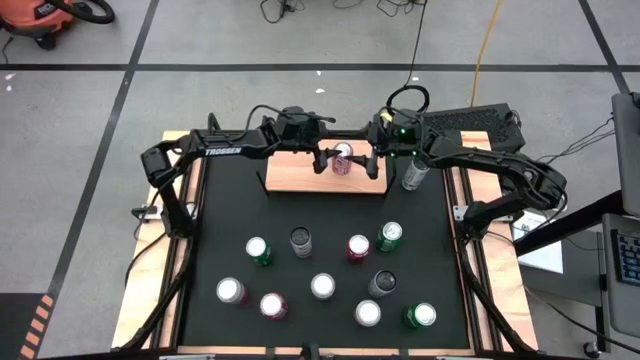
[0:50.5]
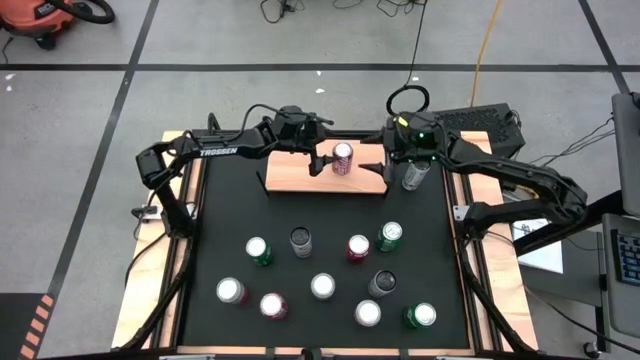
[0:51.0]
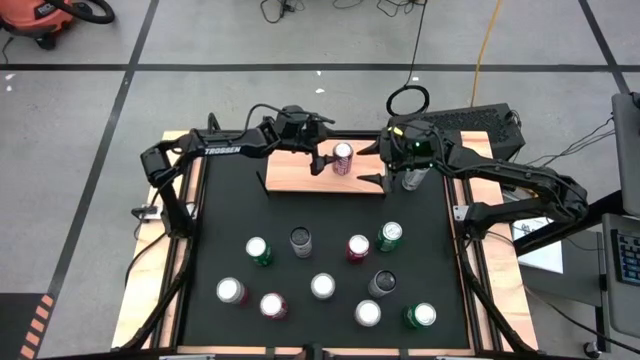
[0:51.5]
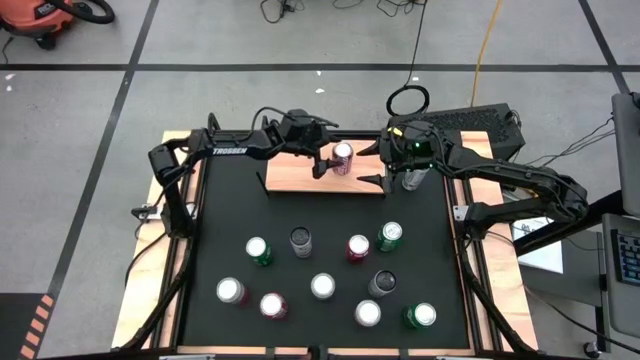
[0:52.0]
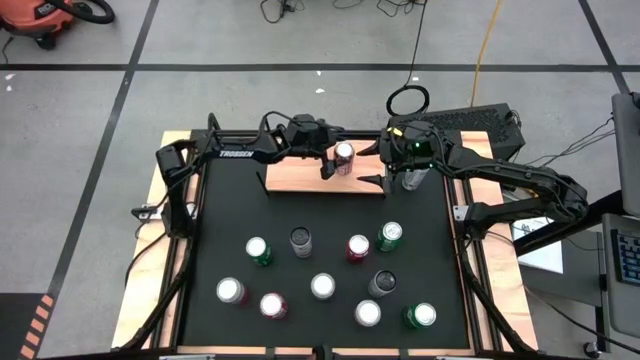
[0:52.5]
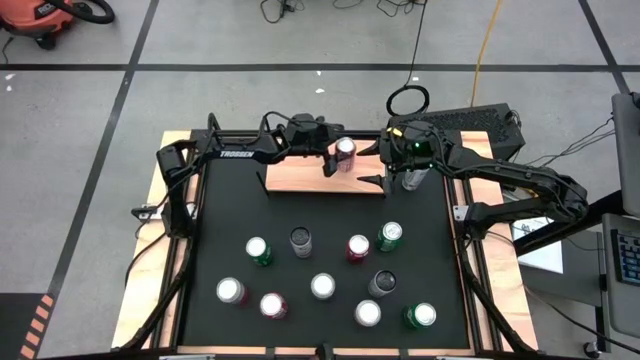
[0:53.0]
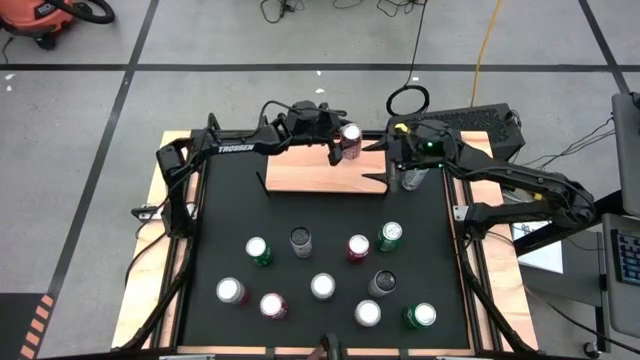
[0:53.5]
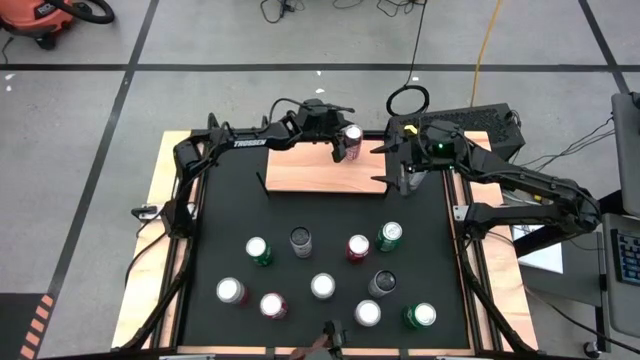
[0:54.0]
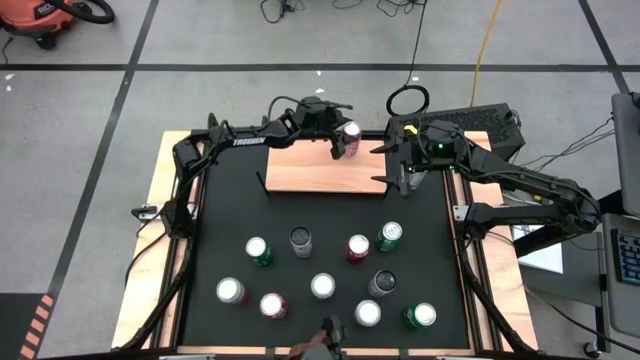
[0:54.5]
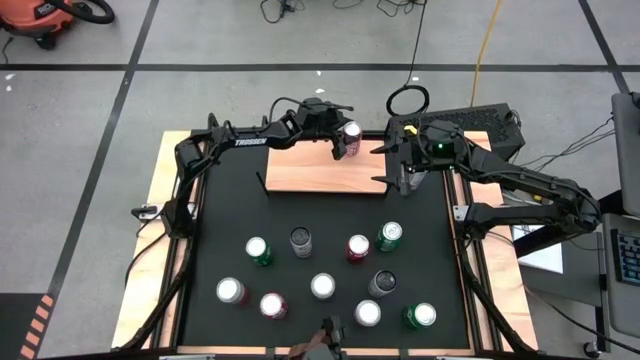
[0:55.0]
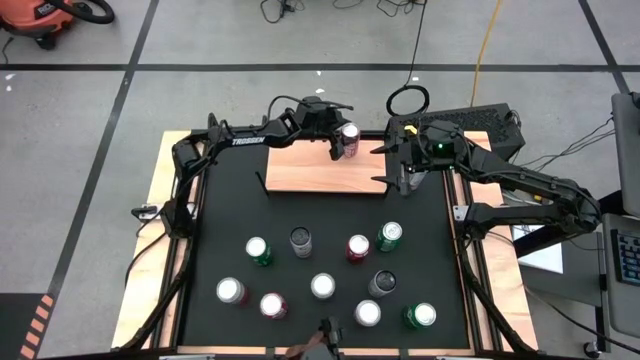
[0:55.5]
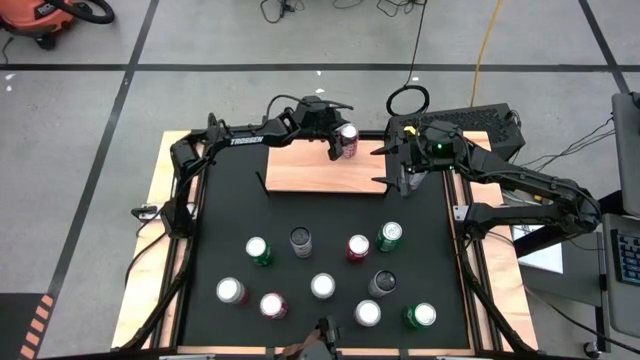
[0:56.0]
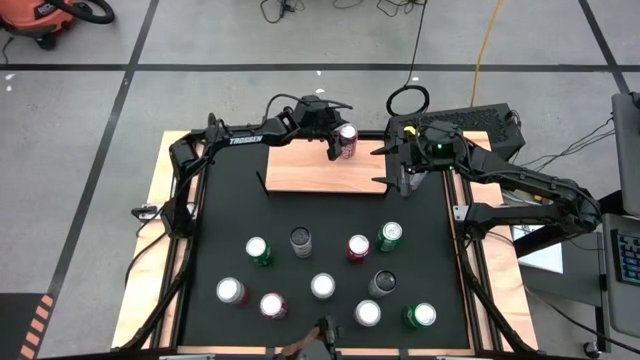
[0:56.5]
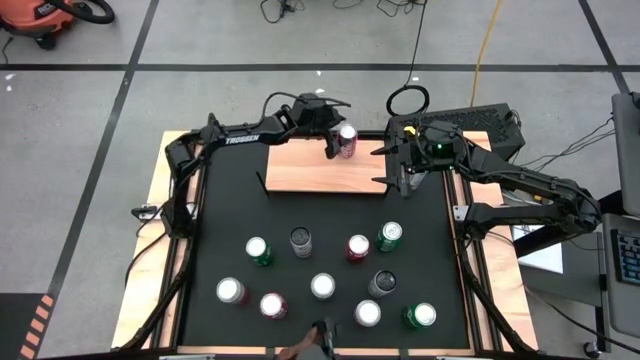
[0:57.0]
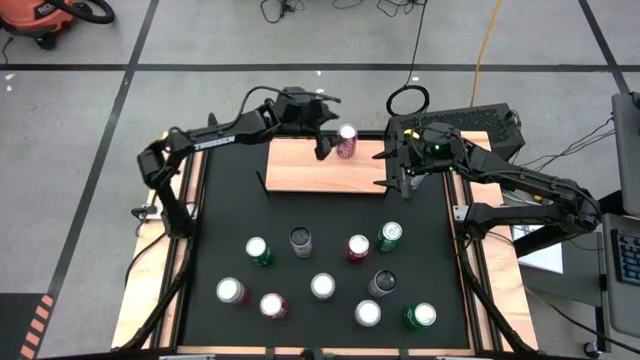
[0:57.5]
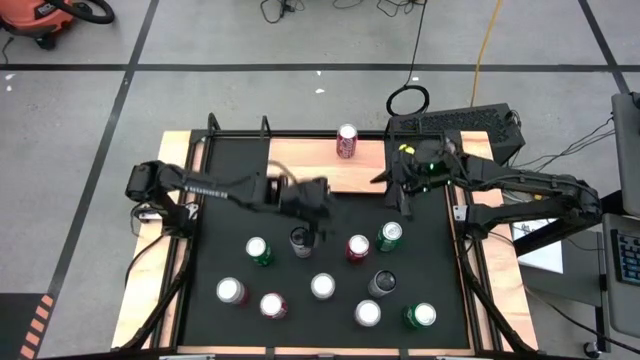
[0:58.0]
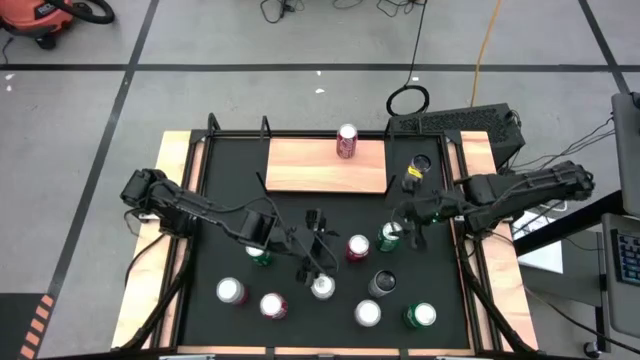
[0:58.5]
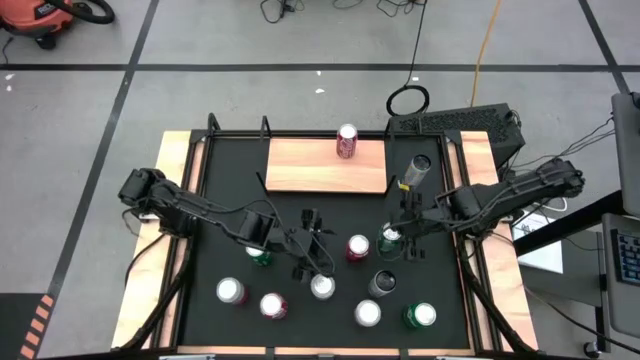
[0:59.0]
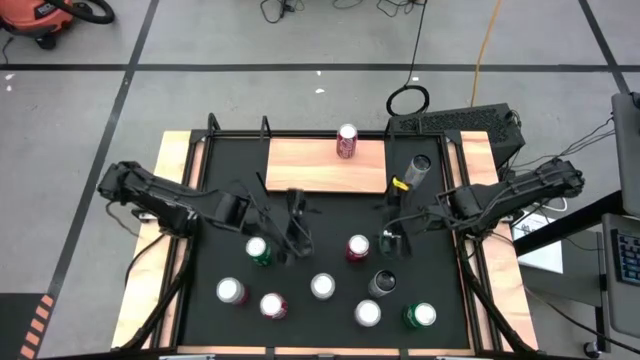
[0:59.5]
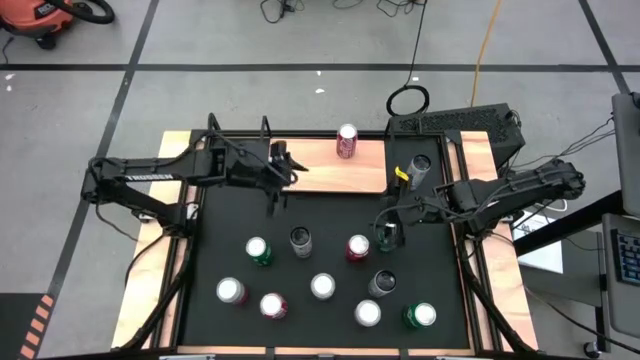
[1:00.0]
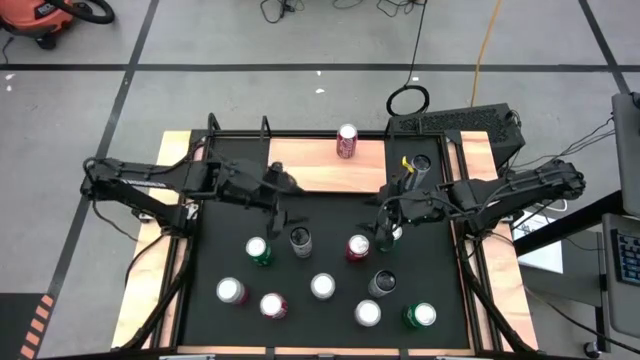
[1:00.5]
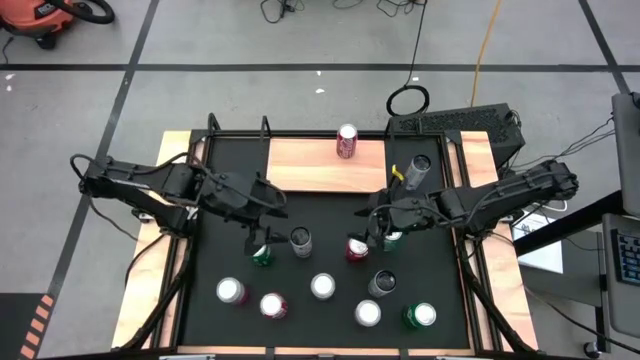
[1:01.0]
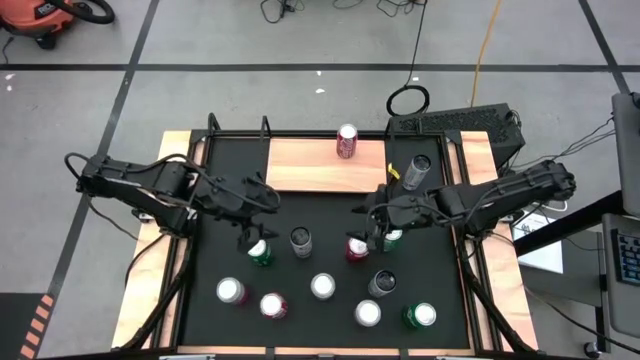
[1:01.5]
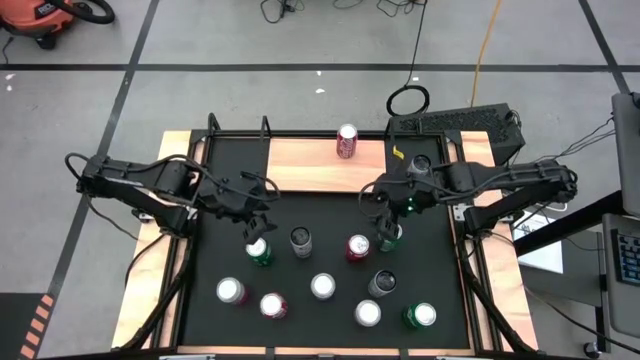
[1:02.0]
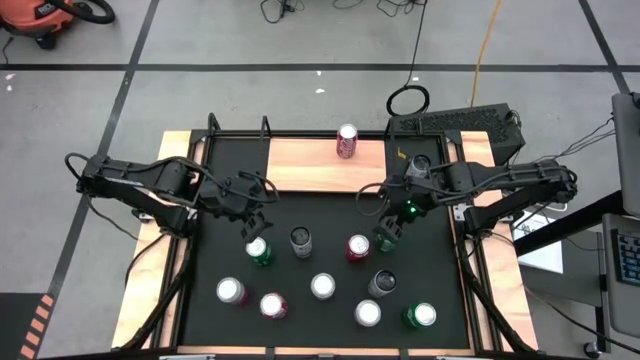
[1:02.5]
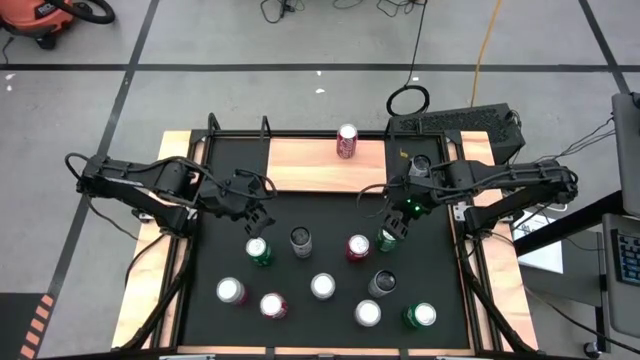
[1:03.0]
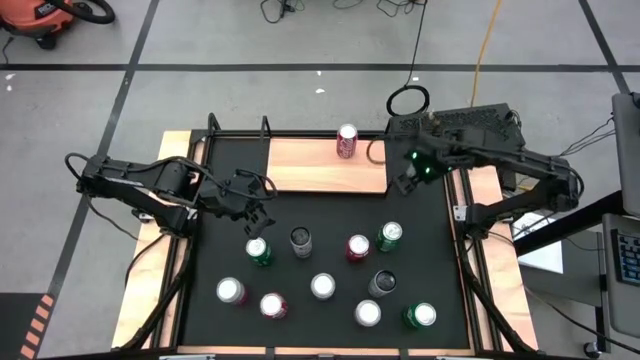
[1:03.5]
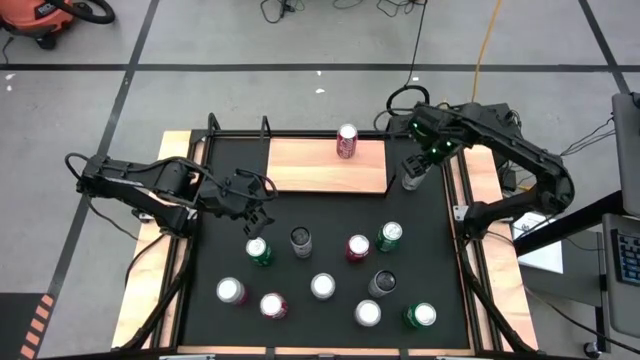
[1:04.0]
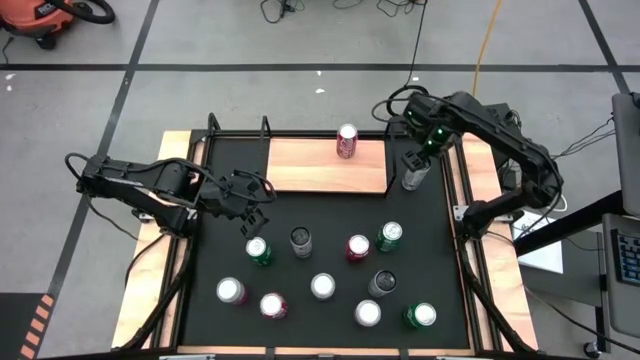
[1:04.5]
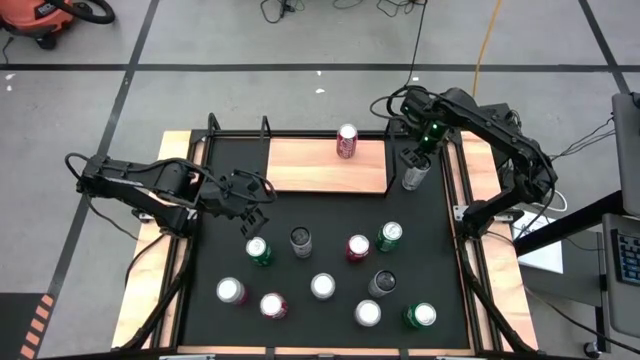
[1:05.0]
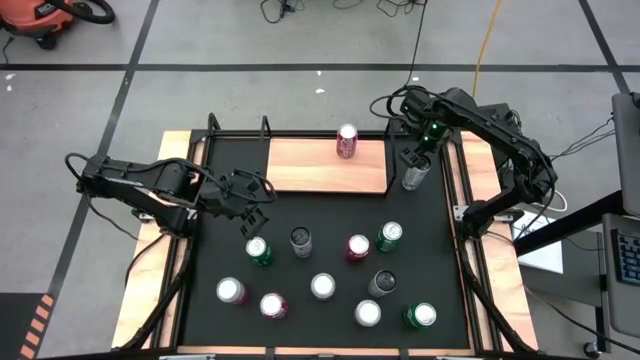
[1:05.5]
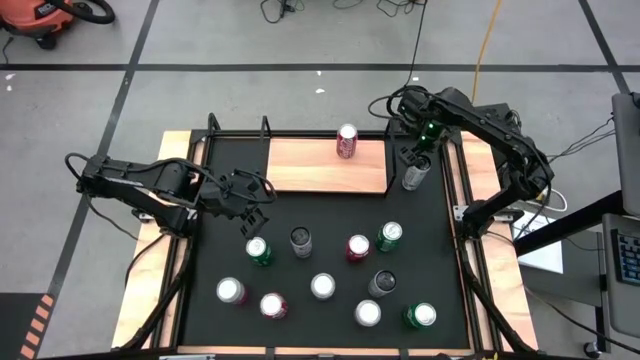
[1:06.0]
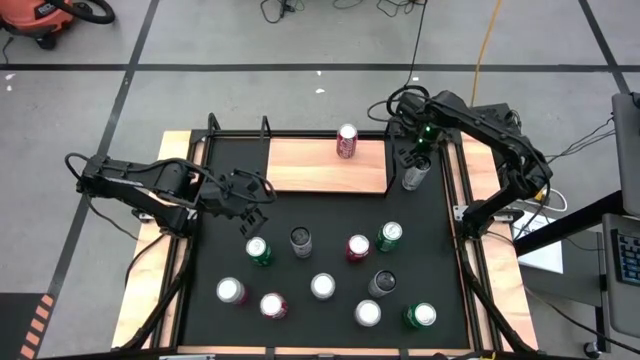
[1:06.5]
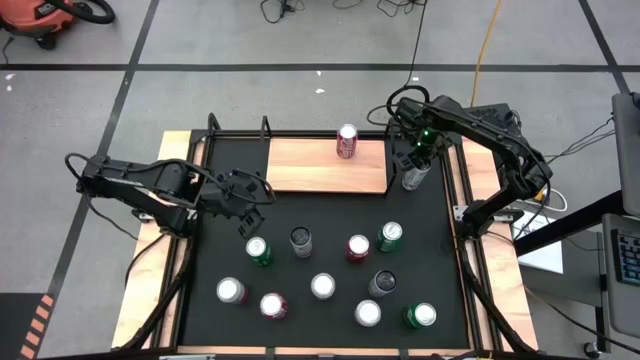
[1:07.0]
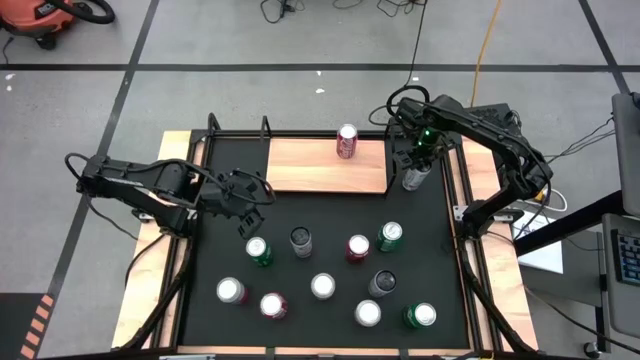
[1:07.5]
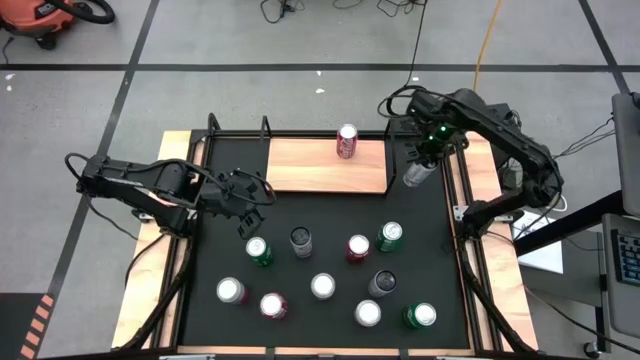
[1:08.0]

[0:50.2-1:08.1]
Task: Place canned beverage on shelf
Put the top right white soda can on the shelf

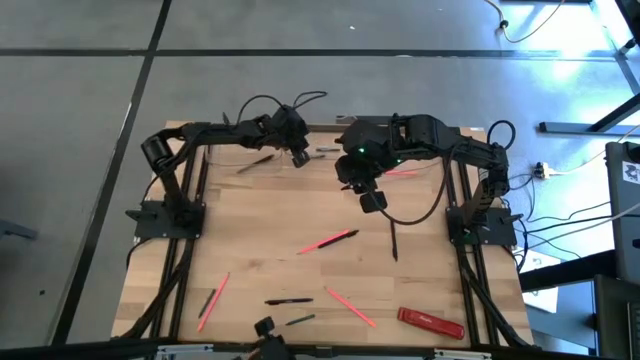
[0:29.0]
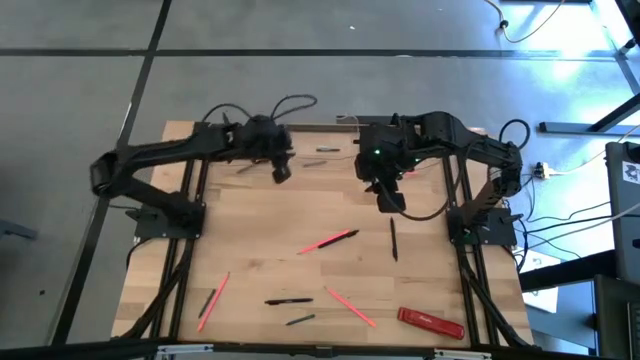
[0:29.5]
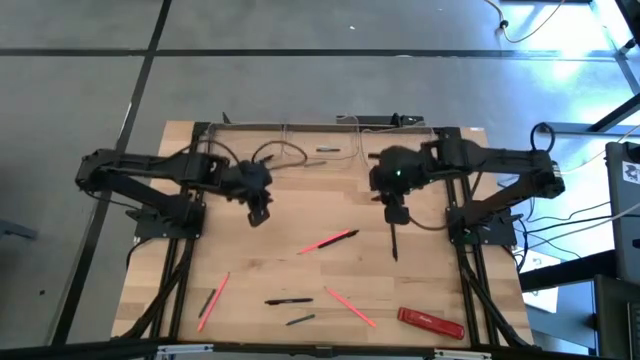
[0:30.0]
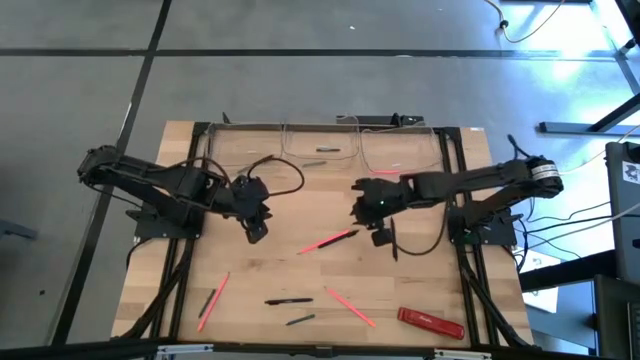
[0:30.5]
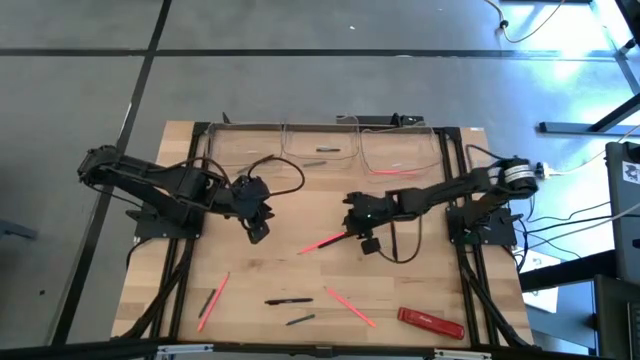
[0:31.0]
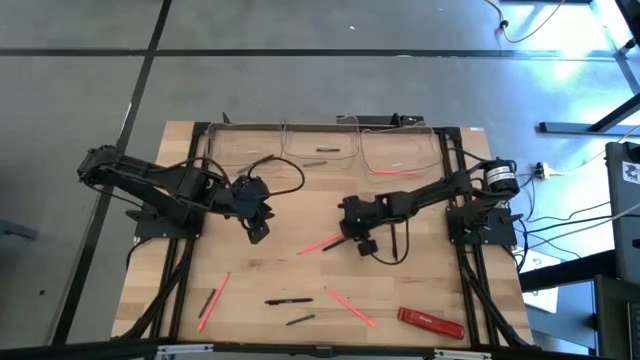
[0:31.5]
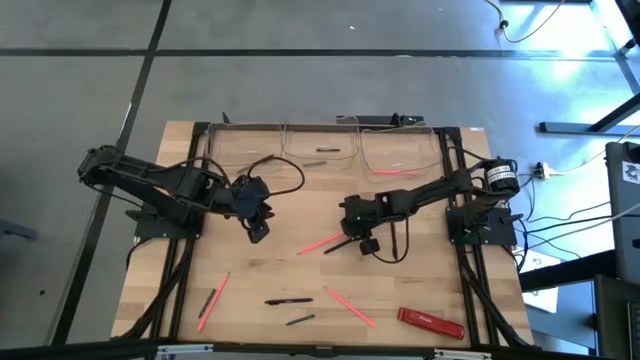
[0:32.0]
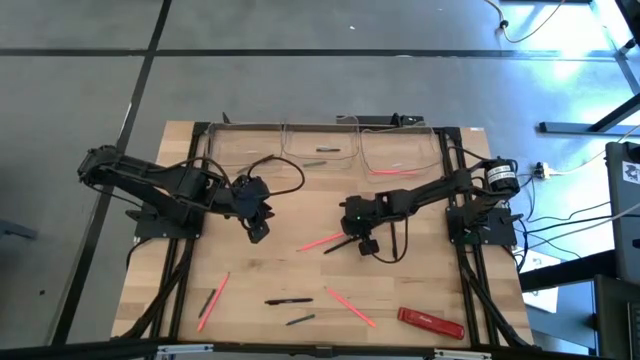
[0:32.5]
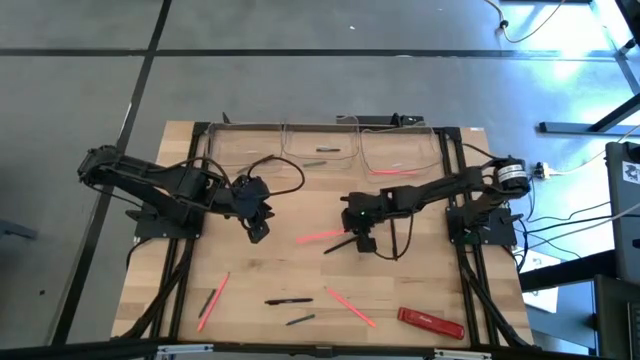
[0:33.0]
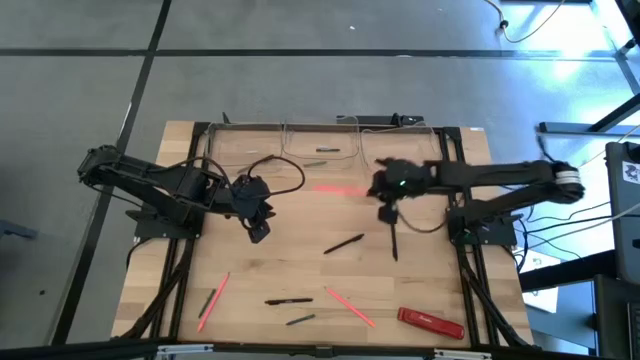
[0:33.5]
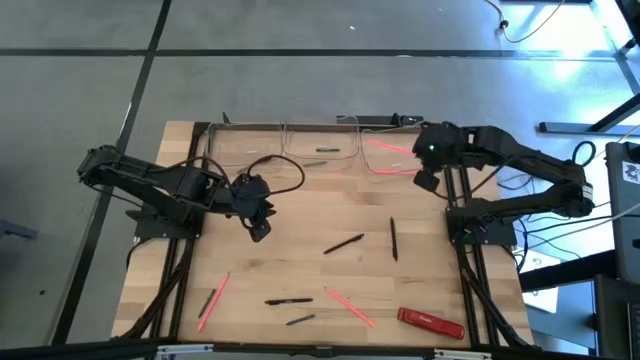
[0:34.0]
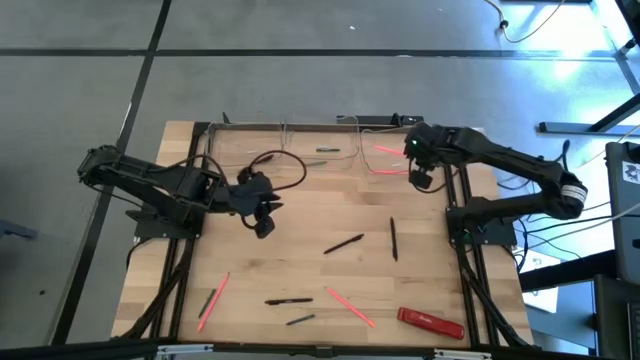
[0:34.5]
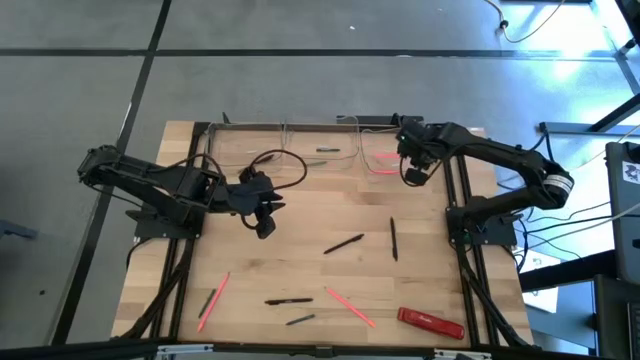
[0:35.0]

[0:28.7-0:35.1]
Task: Sort crayons/erasers/pens/pencils in bins
Put the pink pencil into the right transparent bin
